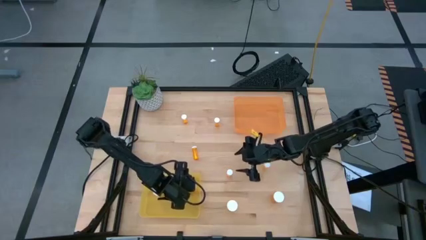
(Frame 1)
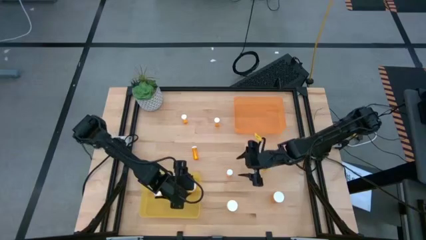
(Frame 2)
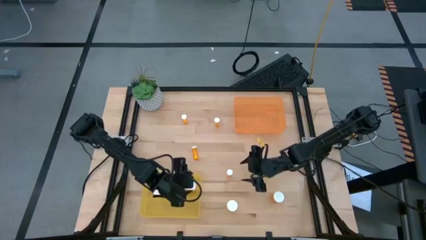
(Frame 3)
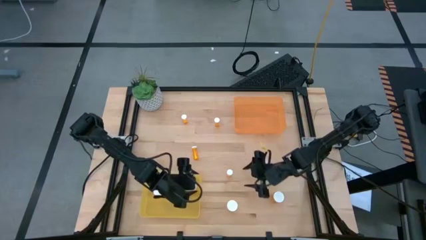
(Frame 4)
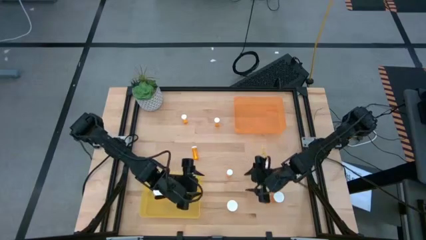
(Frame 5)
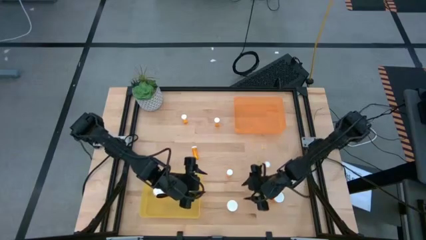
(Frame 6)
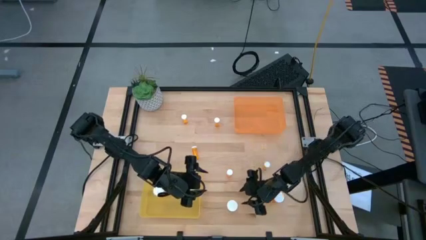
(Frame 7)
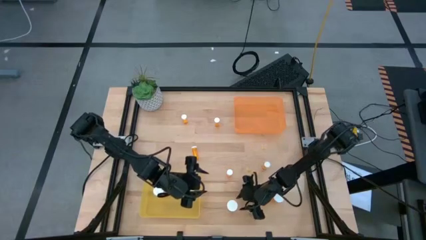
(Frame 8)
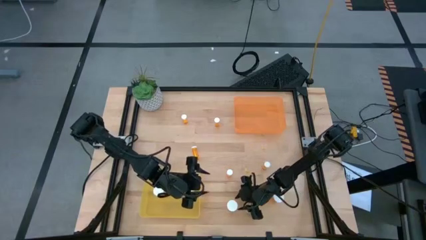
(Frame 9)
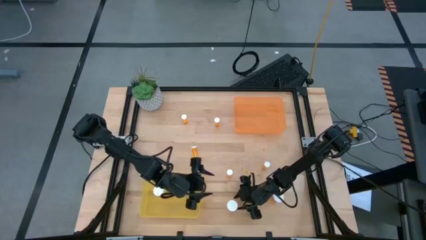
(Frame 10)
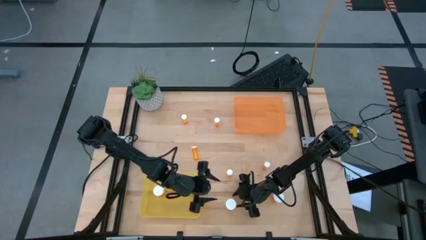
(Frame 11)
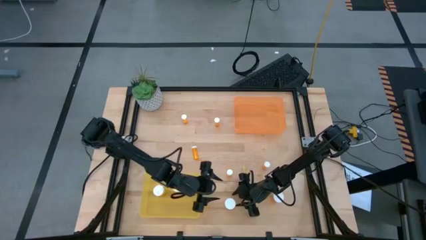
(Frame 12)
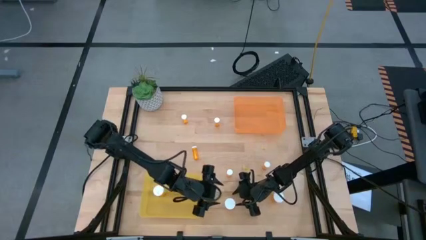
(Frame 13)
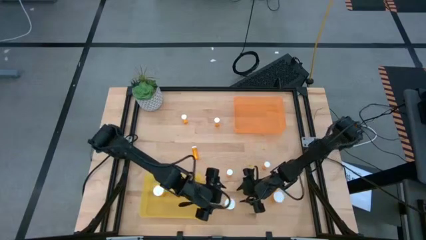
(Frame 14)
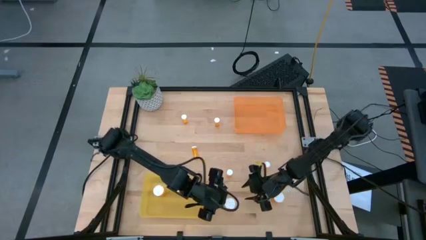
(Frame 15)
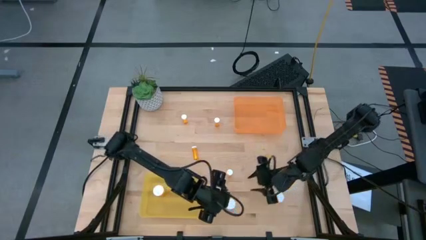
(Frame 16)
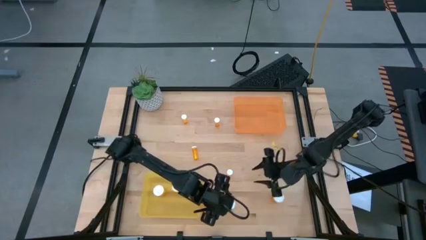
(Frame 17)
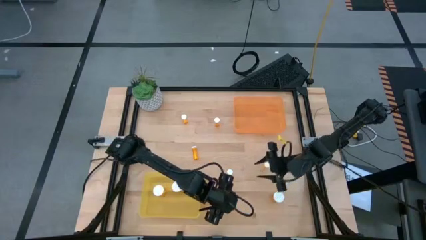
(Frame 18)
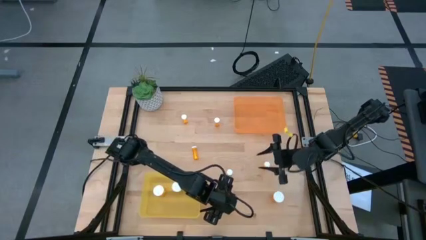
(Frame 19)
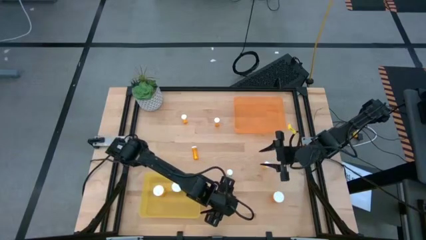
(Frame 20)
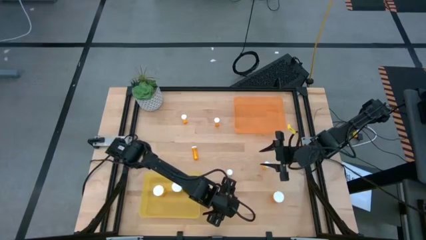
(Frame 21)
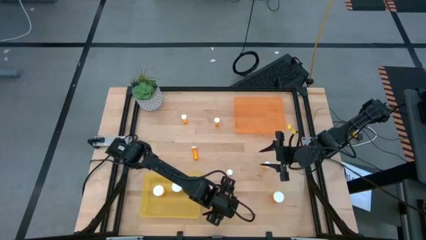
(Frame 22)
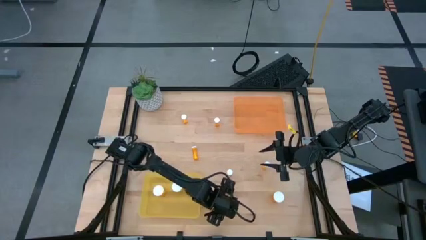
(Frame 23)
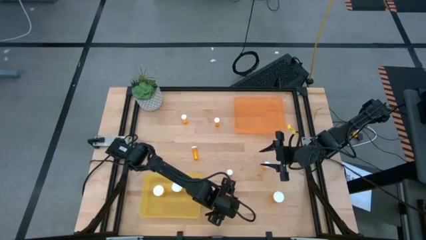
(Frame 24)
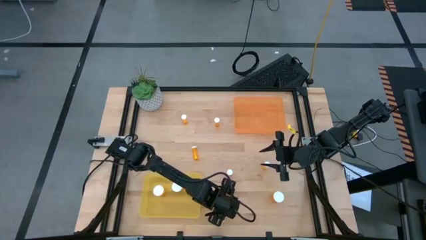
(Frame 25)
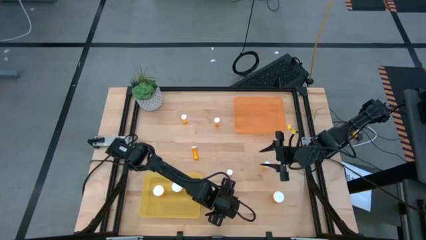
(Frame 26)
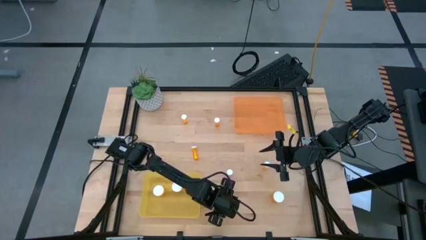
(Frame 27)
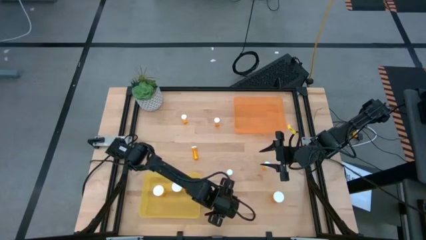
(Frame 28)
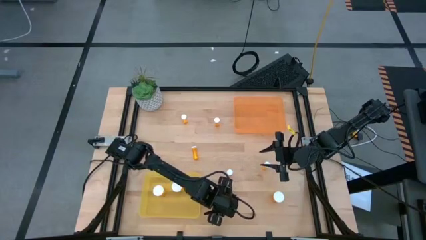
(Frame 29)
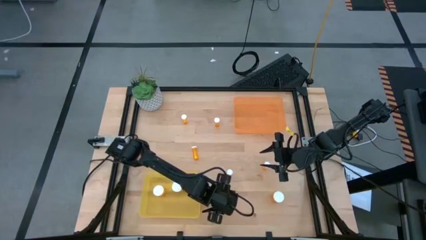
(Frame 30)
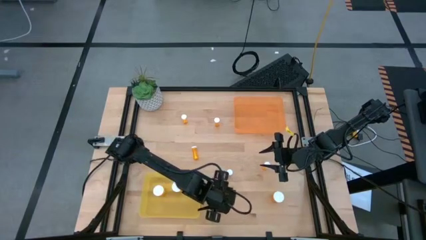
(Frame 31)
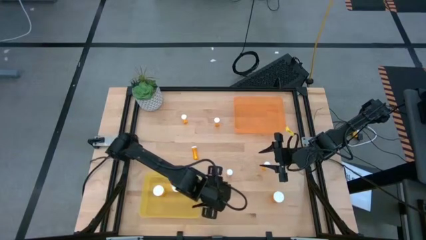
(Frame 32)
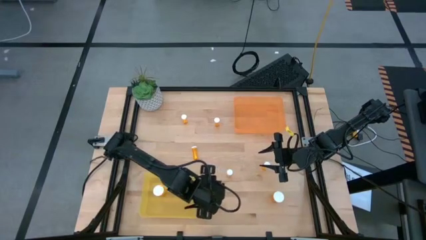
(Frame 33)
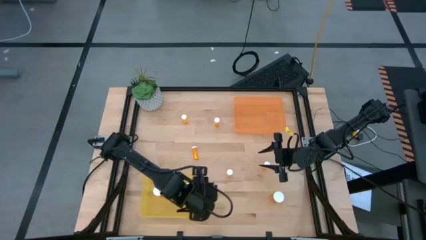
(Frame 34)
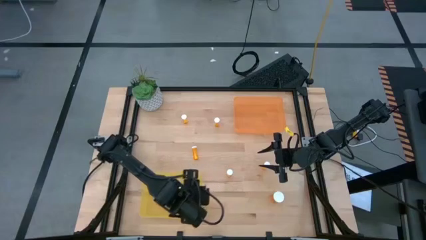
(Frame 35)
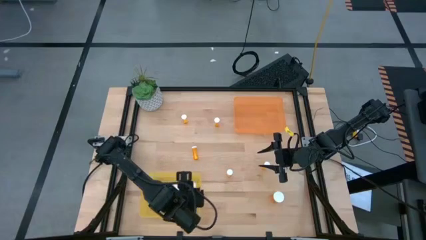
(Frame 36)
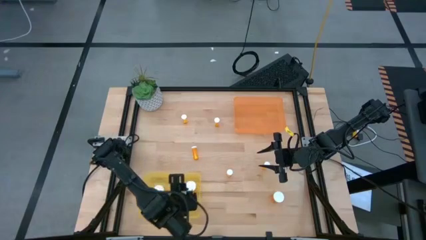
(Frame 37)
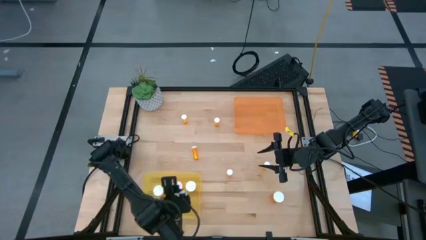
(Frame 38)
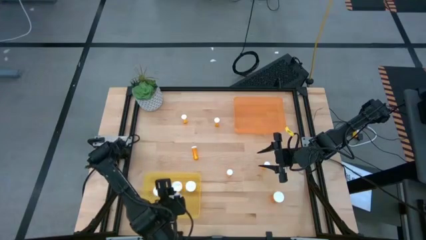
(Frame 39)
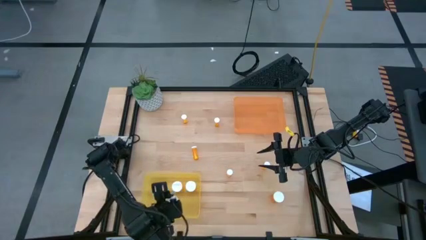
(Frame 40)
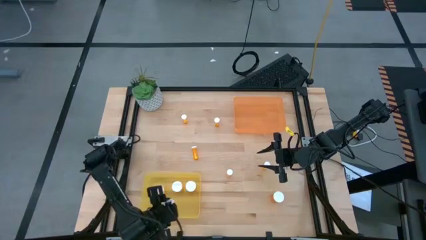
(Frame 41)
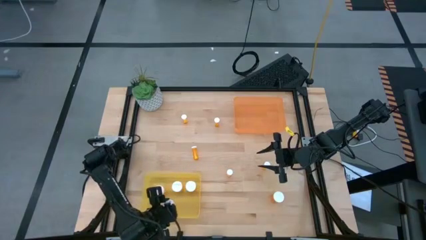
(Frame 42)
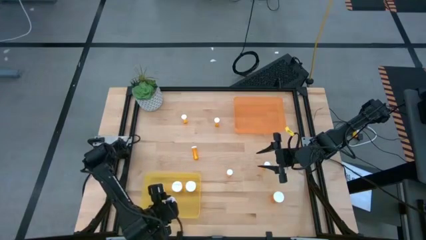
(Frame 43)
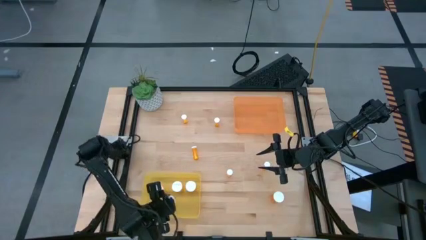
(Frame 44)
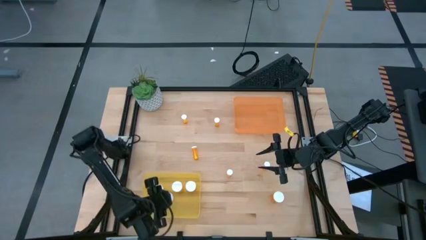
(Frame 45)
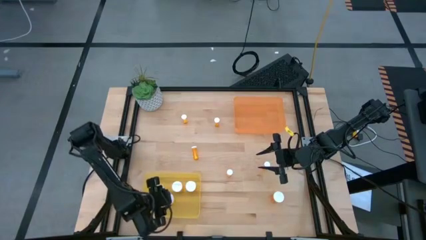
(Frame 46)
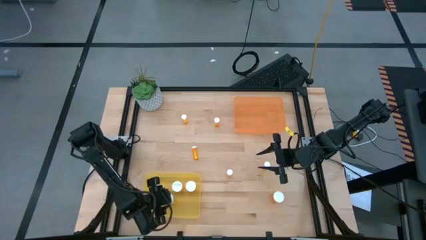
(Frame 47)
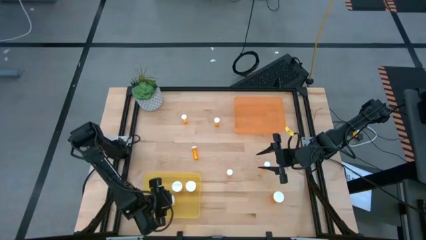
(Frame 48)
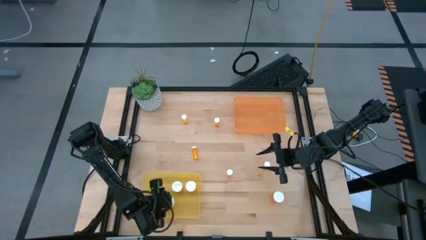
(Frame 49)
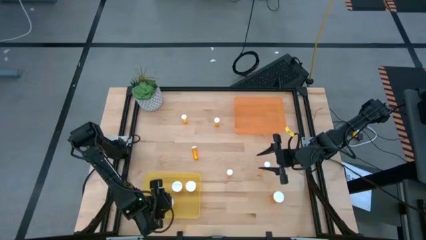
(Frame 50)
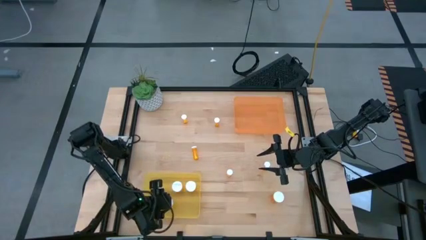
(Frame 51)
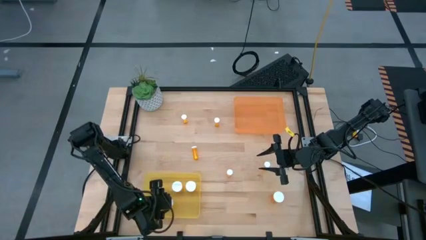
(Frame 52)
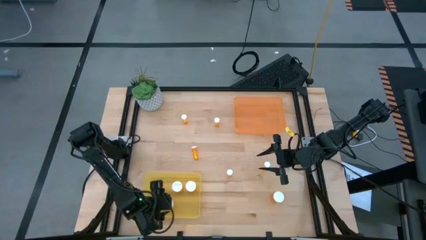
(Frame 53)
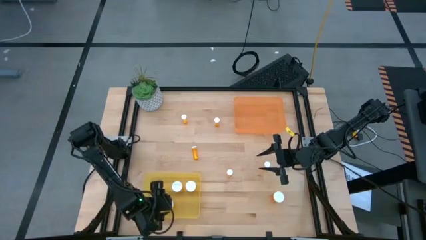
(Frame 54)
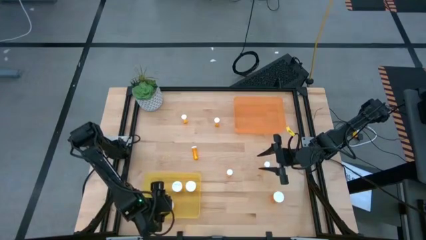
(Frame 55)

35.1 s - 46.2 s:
Task: Pick and place medicine bottles into bin by pill shape (circle, oval)
Put the large pill bottle into the yellow bin

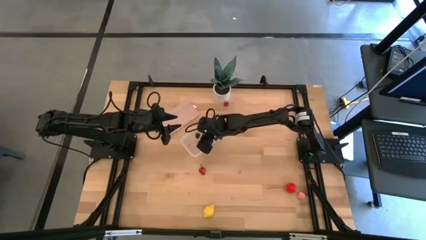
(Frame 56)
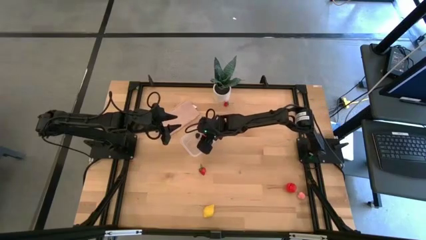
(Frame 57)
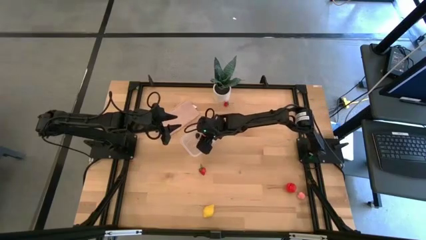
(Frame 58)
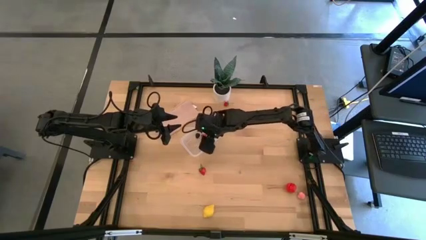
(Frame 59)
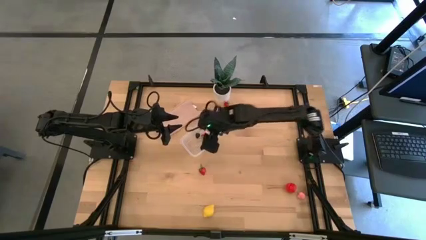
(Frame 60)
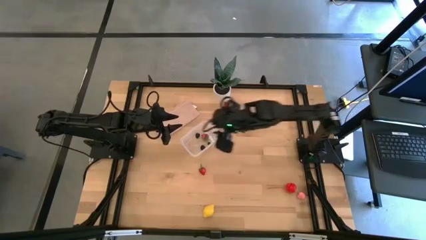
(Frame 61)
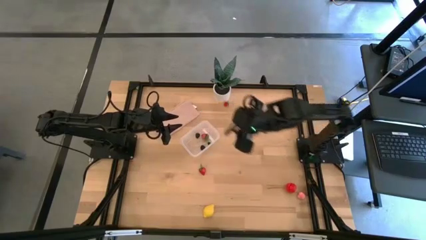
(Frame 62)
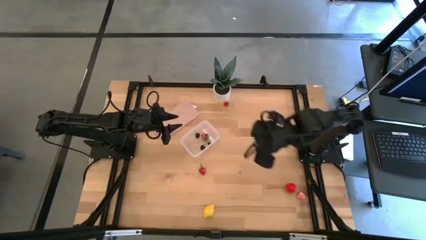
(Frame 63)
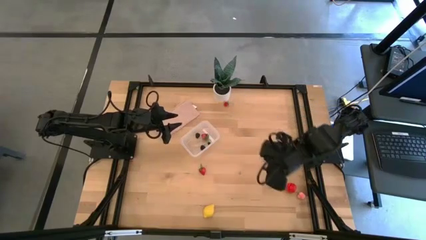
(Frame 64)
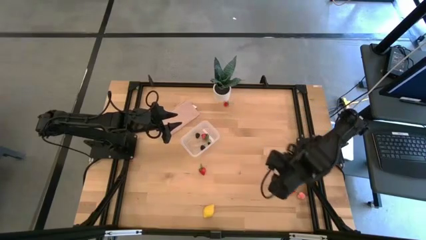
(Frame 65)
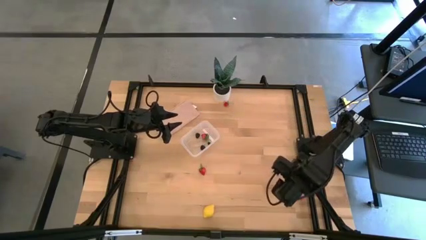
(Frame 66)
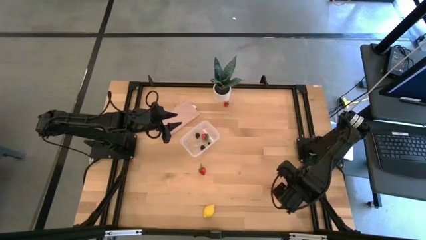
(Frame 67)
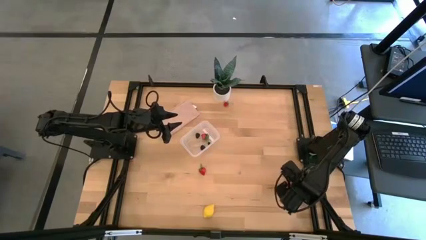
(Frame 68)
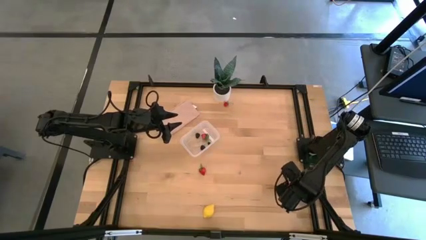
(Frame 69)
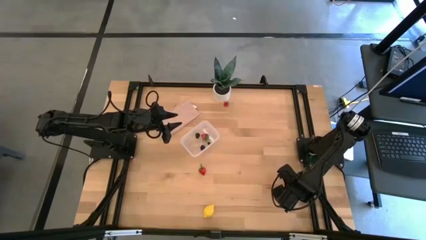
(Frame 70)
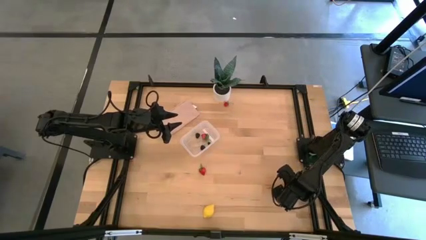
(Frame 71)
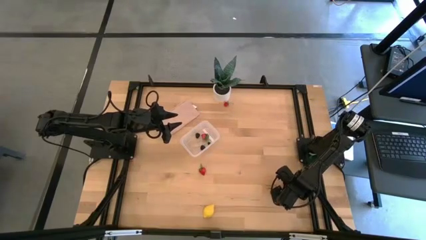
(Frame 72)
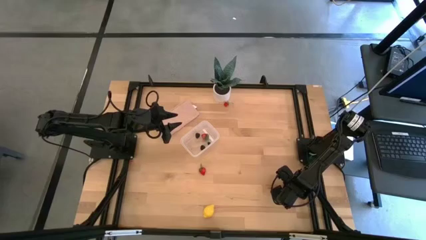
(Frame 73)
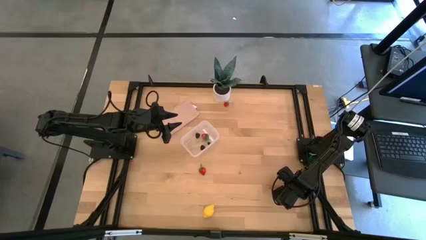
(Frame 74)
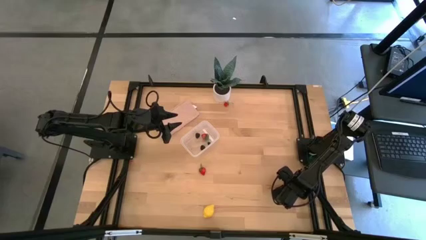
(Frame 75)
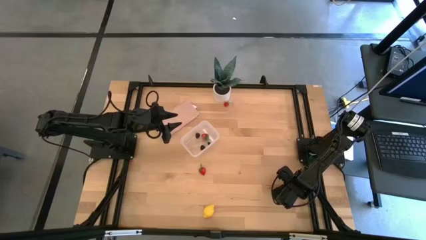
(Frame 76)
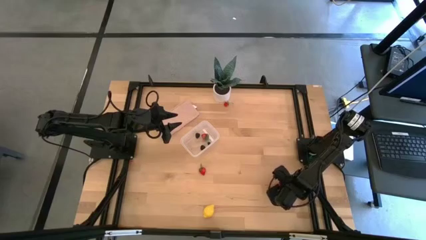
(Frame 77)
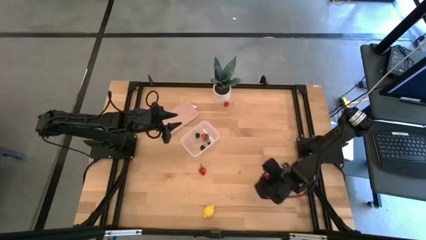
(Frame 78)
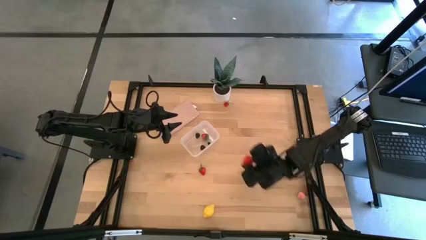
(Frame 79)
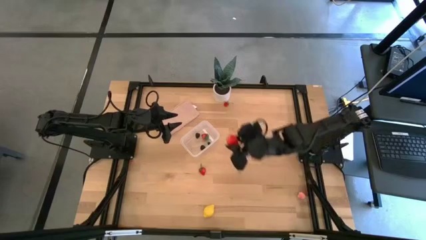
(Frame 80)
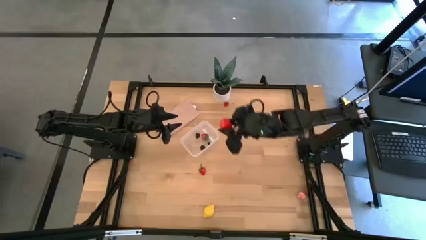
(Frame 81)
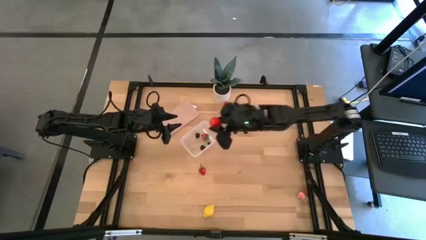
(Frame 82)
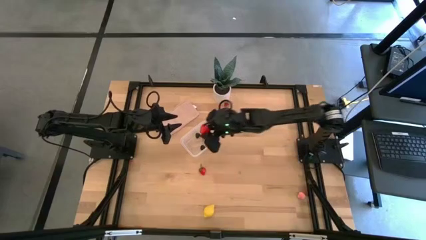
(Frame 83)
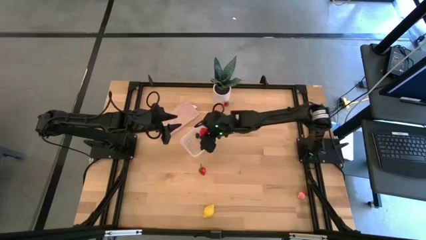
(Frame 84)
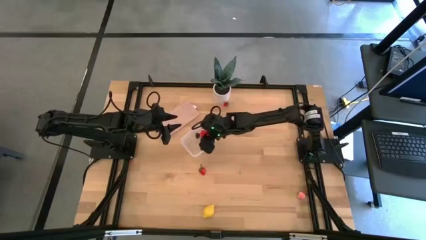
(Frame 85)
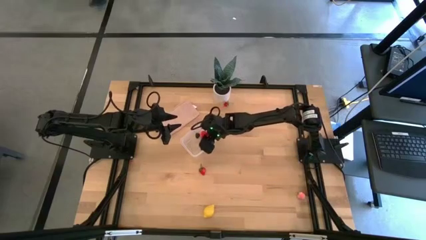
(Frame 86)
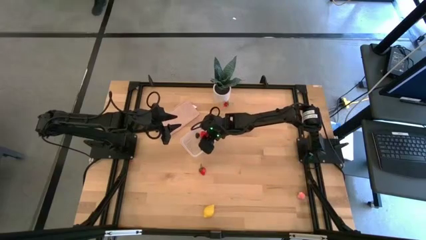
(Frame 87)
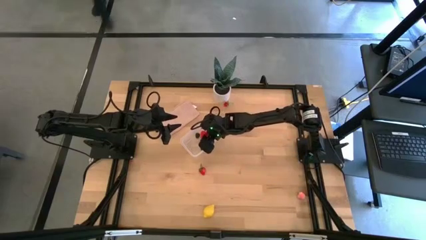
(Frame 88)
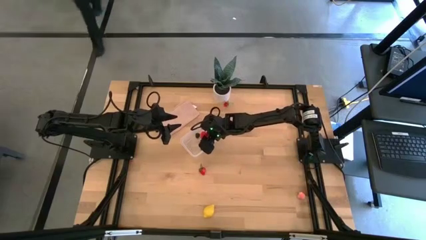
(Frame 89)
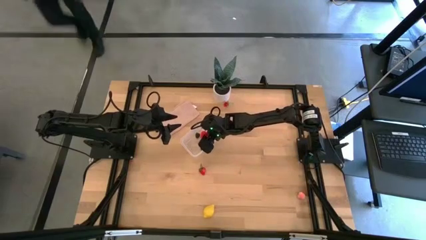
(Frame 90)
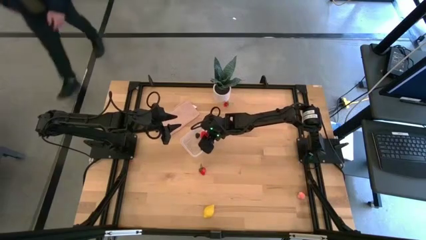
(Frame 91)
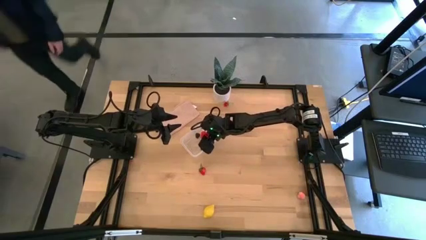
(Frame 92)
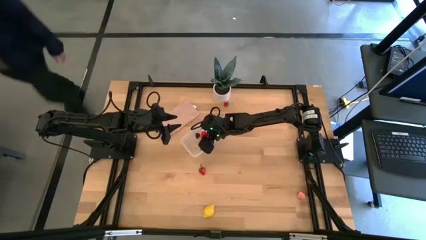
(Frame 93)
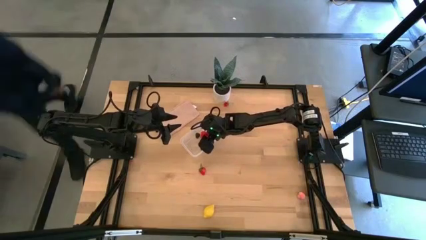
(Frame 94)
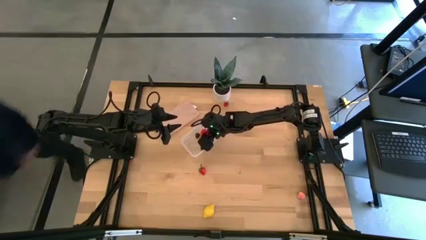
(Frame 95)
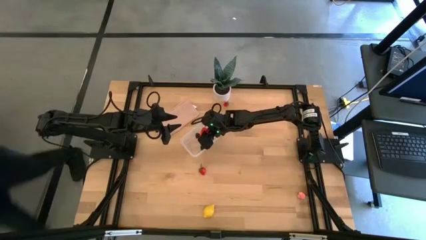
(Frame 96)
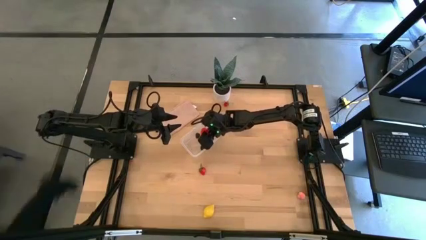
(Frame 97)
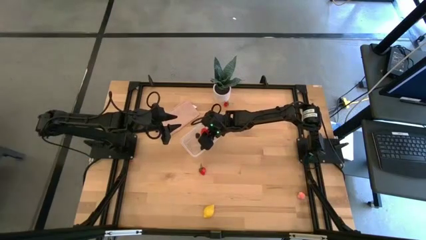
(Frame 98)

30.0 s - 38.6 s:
Task: Pick and placing Produce into tupperware
Put the red lychee into the transparent bin
